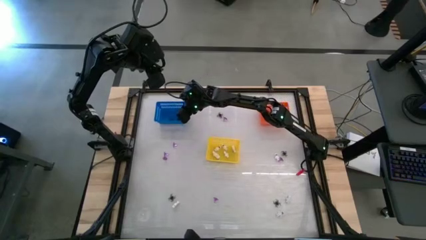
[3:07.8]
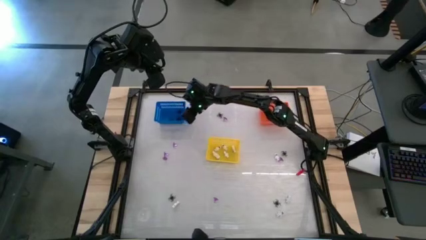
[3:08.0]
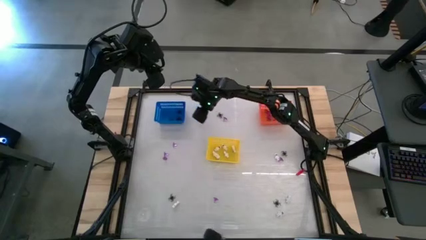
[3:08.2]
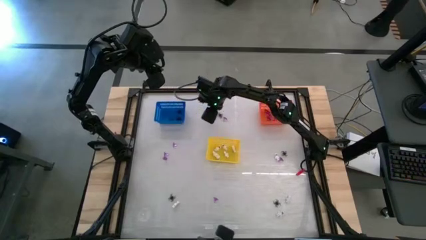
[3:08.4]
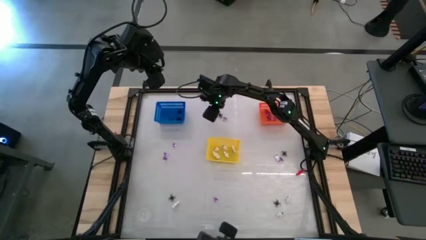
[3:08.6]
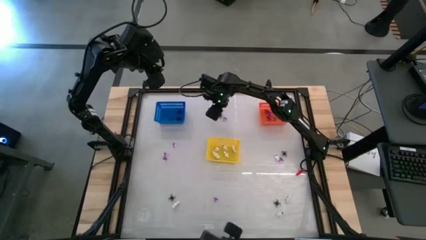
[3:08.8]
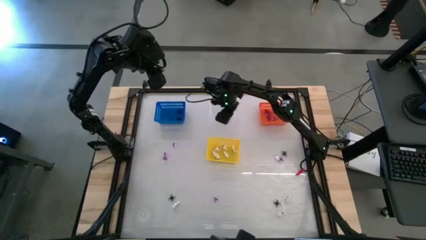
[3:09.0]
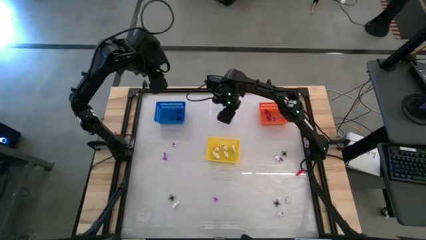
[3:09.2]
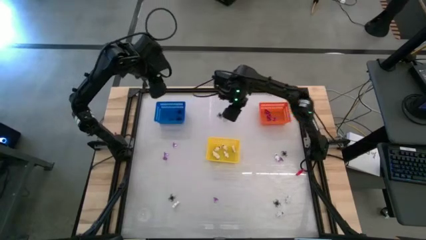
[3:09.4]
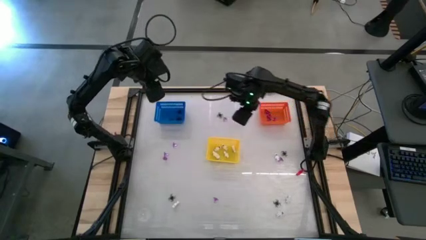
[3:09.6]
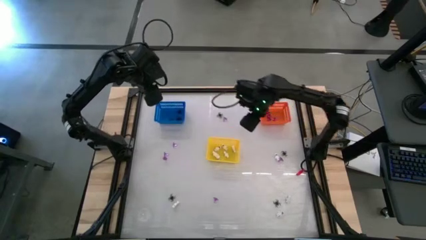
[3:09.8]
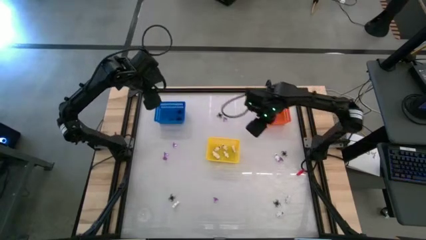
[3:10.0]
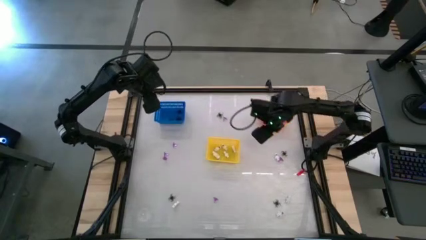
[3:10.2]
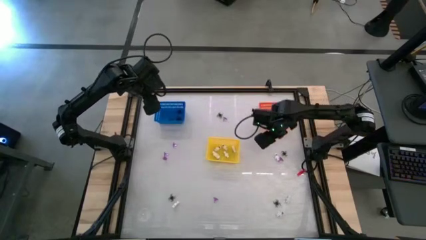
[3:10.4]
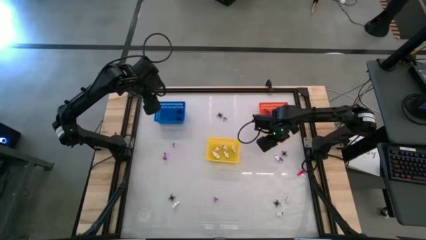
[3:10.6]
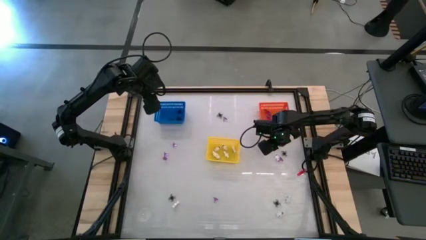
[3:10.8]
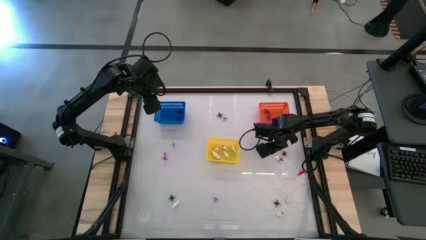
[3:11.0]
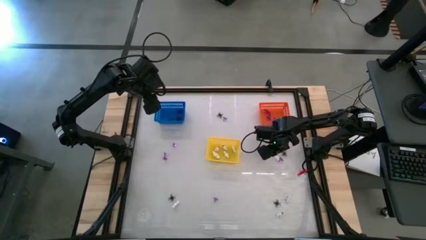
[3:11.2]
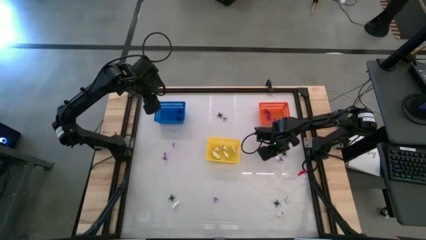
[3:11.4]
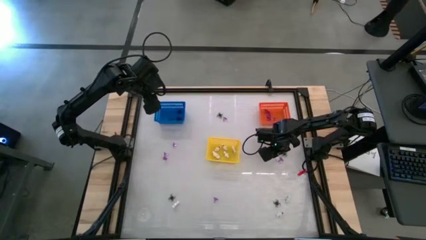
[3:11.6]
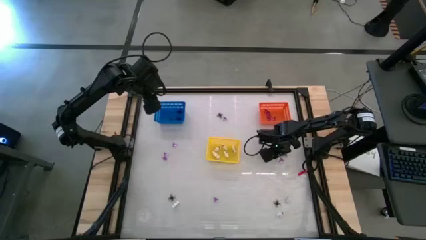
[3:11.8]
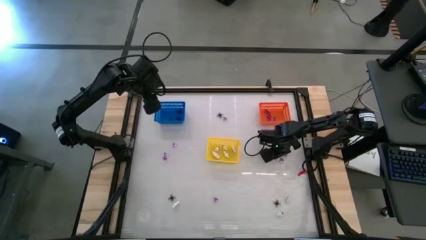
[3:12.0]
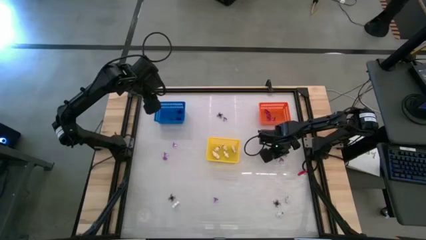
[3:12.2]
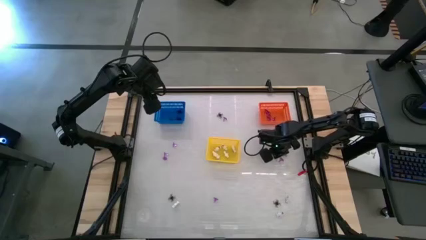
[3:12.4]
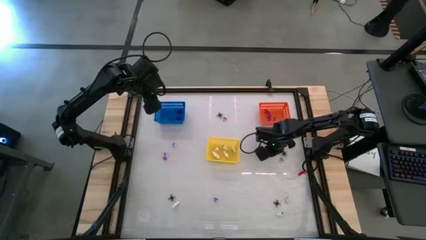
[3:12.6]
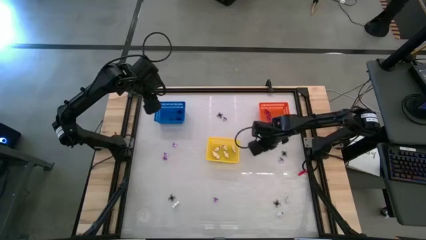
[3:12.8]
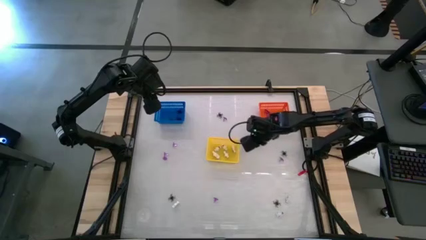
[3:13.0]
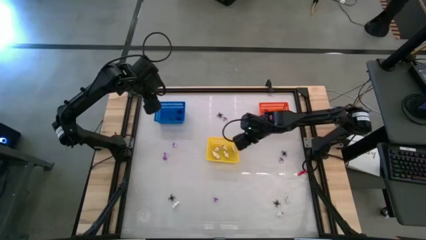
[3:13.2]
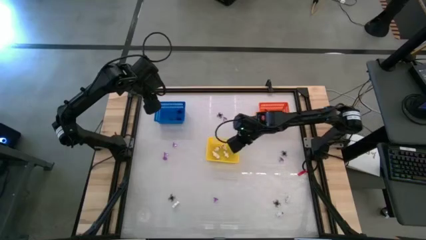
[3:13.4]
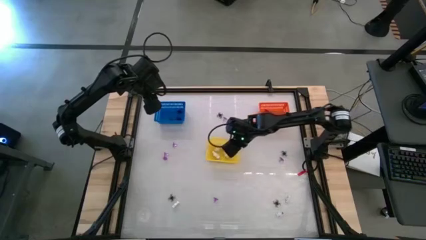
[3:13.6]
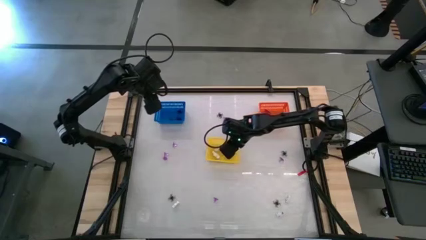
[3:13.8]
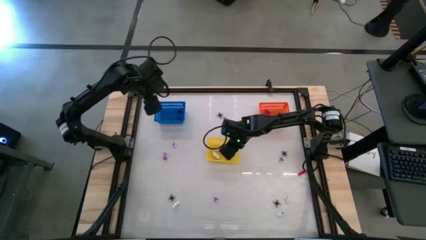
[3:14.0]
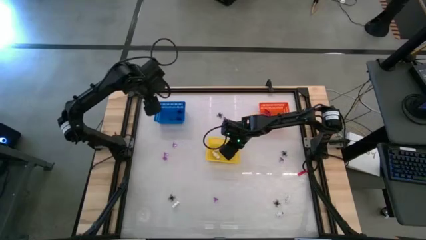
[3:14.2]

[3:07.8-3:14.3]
Task: Sort Halloween decoration
Put the white skeleton toy into the yellow bin

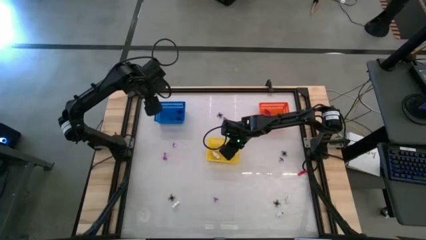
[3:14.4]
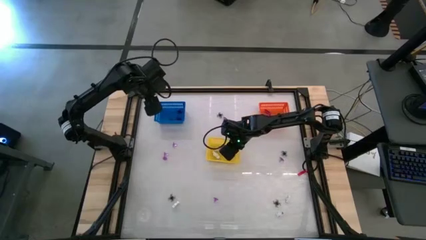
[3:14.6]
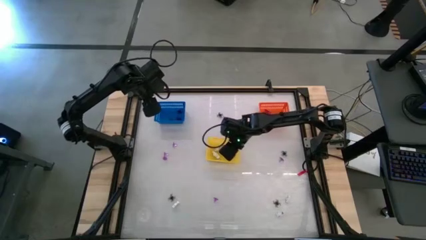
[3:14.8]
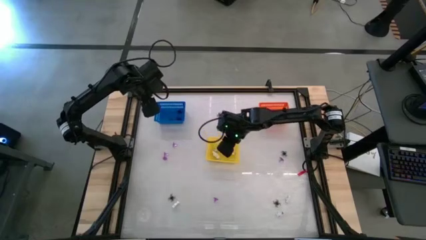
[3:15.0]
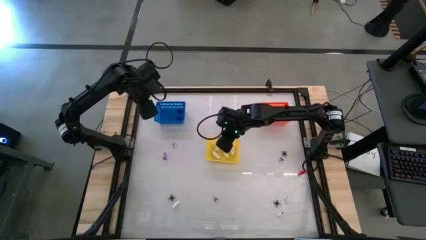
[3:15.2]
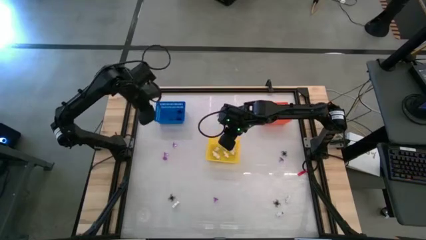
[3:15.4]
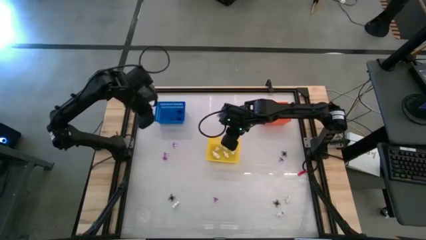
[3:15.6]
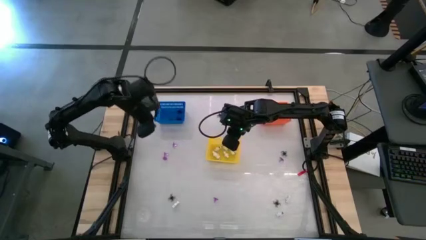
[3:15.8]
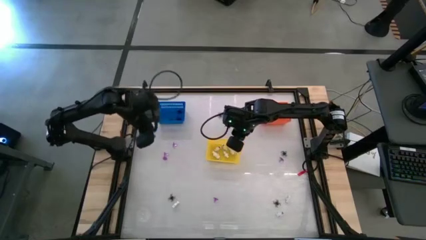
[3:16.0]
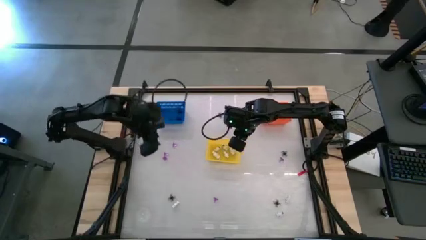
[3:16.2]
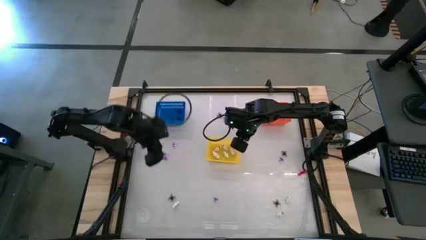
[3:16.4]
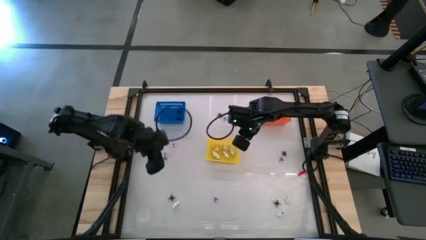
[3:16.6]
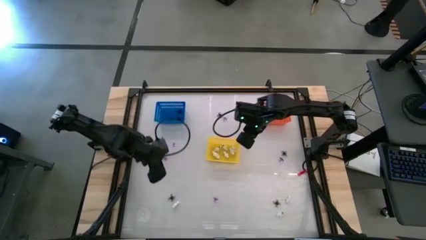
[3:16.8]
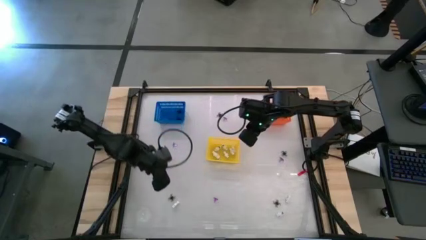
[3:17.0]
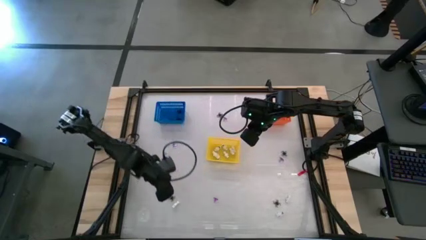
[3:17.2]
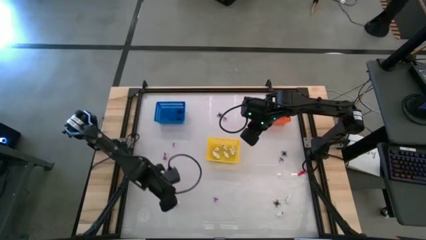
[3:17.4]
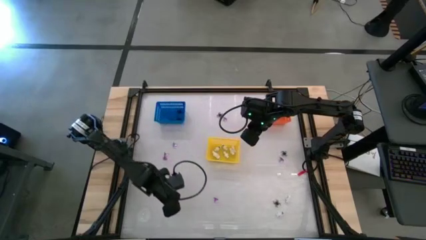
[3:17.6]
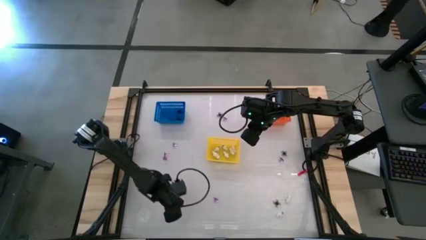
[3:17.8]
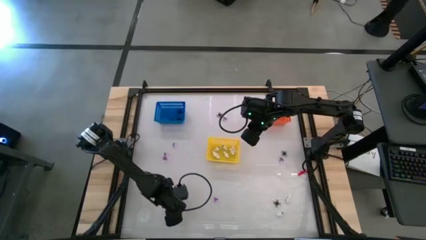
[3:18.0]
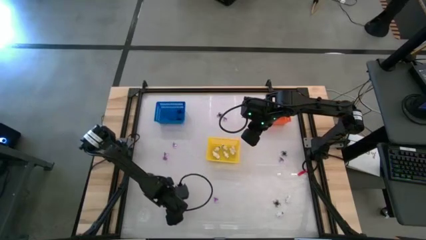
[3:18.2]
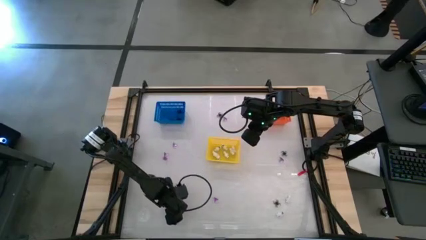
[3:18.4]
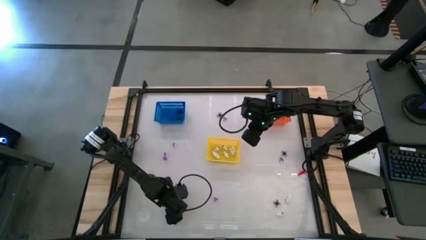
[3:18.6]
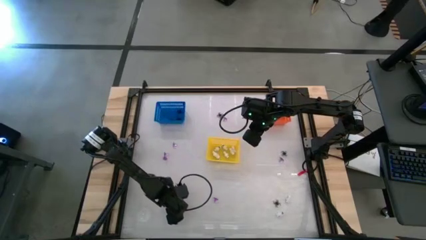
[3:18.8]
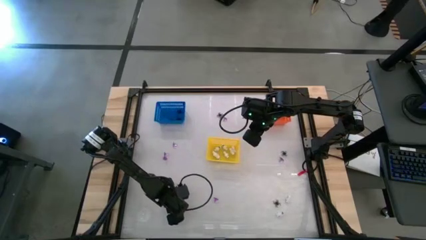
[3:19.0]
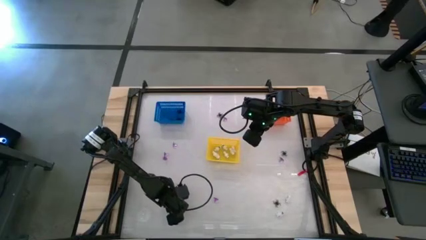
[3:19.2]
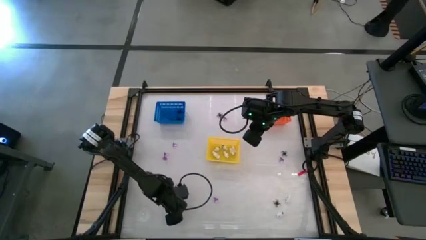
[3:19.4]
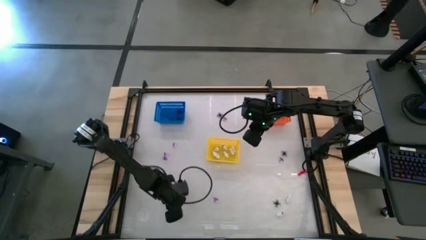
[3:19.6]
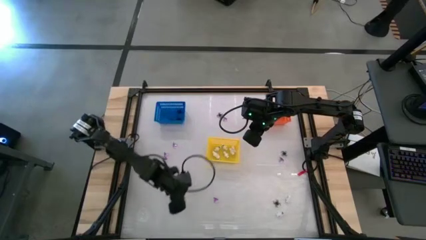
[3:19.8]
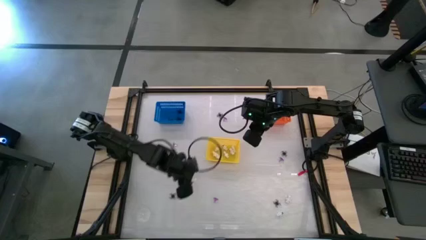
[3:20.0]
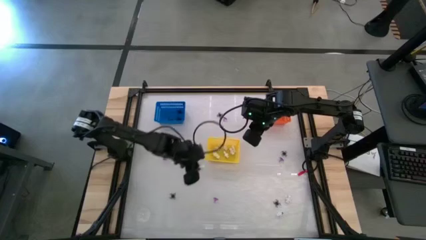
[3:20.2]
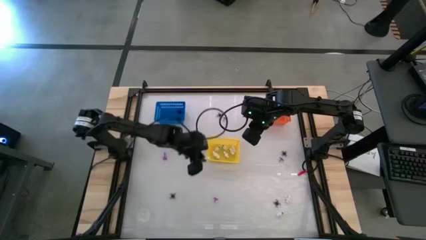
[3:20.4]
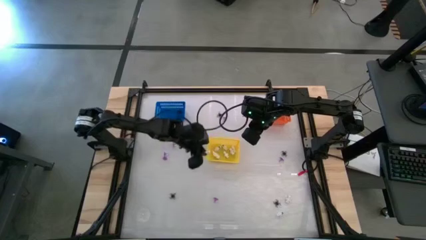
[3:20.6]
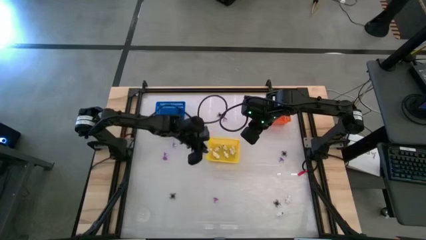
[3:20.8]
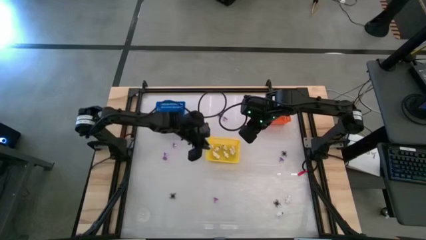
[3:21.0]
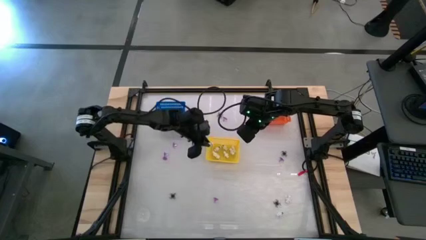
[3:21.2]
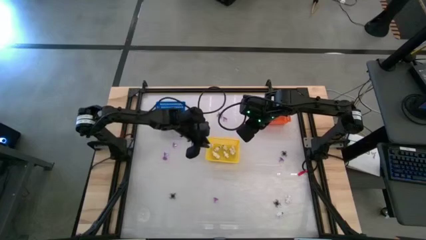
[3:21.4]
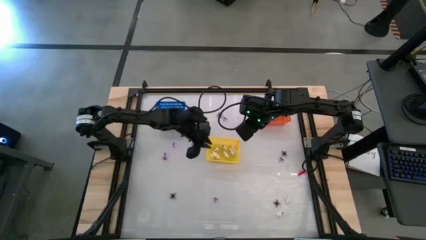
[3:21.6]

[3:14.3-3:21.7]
Put the white skeleton toy into the yellow bin
